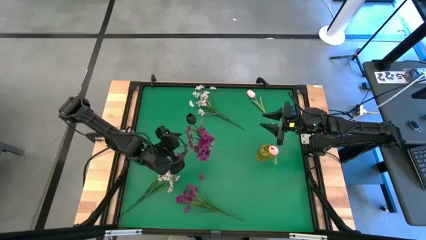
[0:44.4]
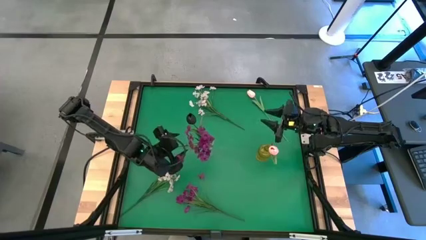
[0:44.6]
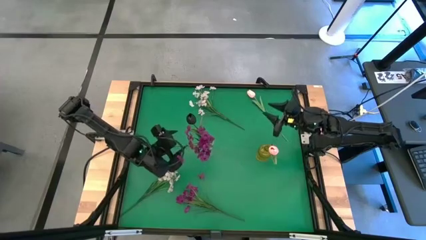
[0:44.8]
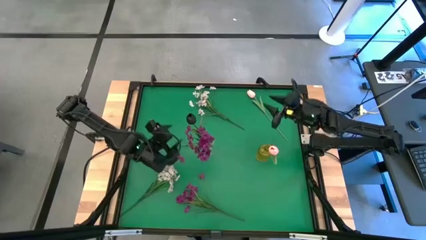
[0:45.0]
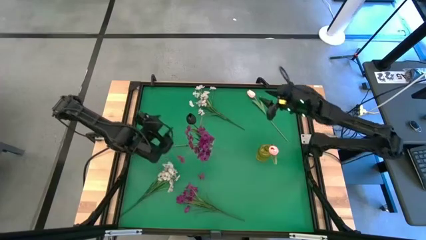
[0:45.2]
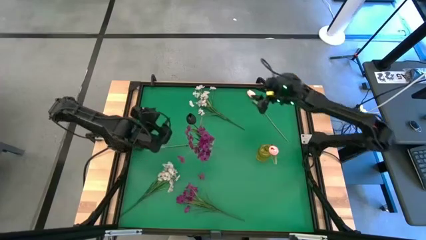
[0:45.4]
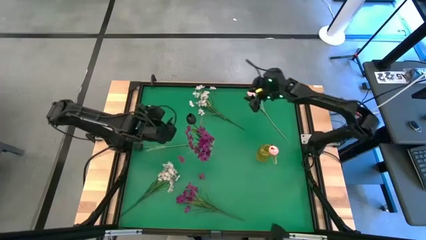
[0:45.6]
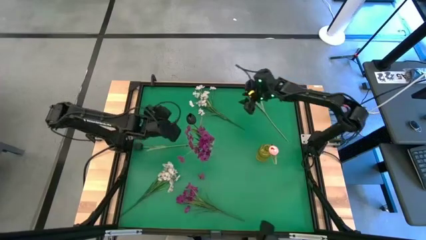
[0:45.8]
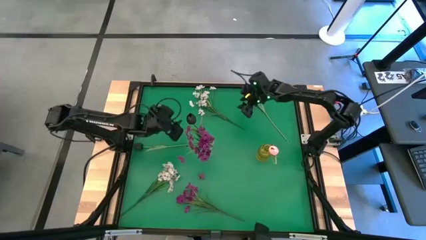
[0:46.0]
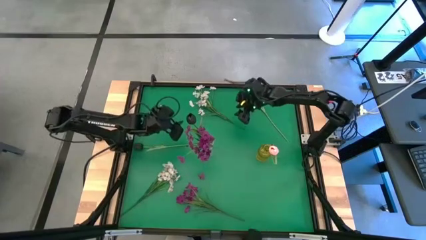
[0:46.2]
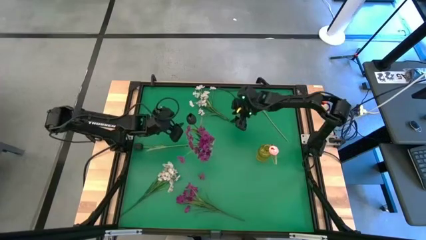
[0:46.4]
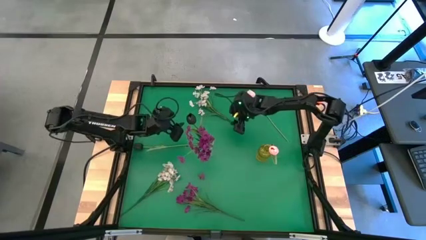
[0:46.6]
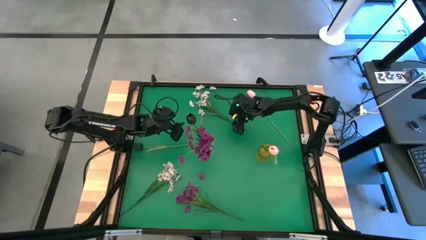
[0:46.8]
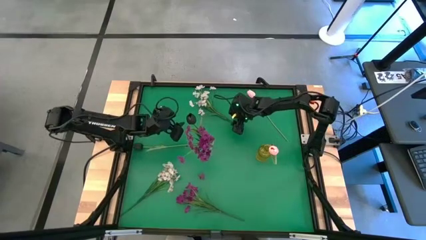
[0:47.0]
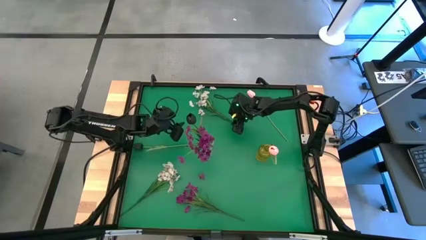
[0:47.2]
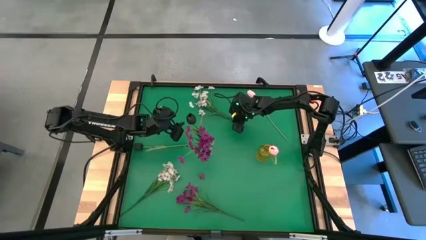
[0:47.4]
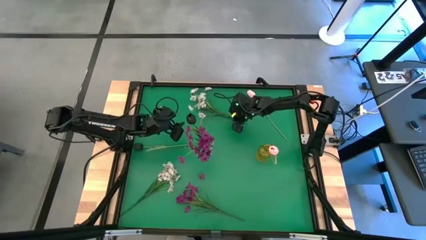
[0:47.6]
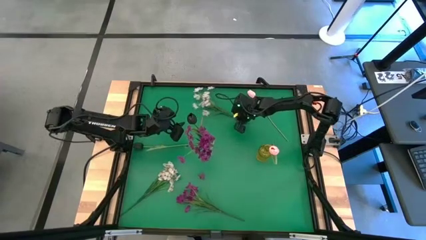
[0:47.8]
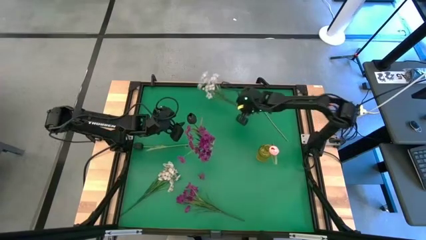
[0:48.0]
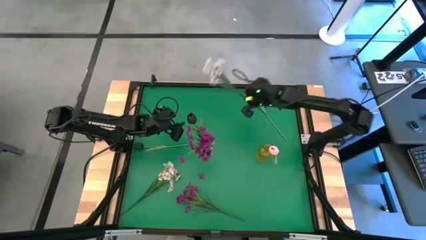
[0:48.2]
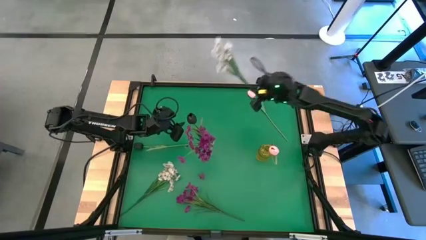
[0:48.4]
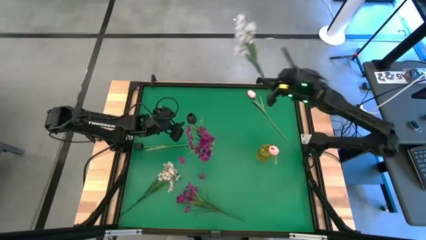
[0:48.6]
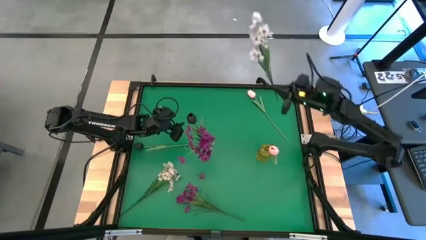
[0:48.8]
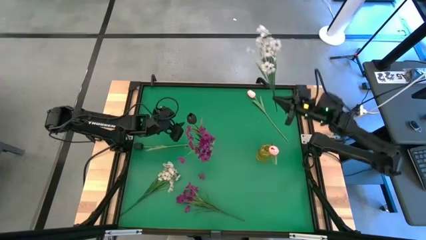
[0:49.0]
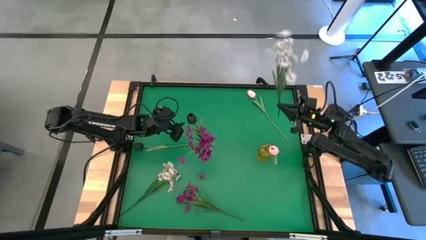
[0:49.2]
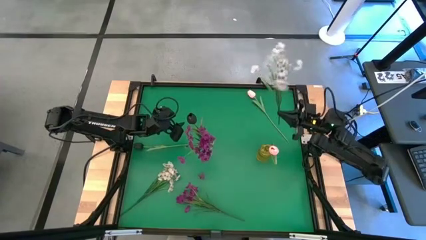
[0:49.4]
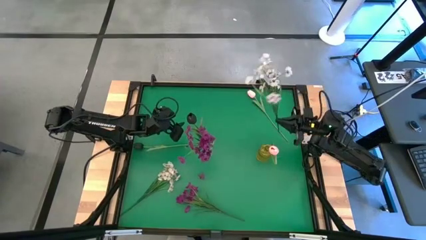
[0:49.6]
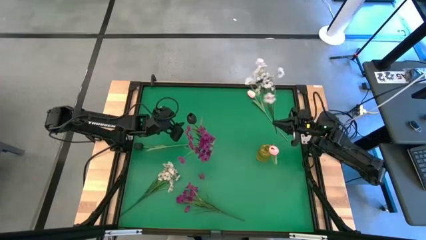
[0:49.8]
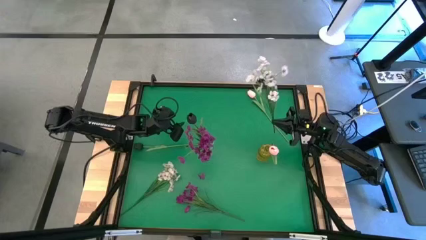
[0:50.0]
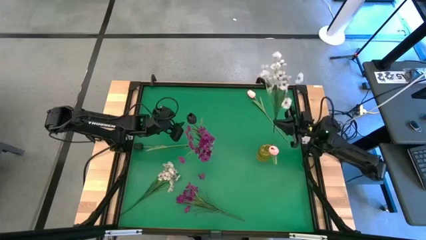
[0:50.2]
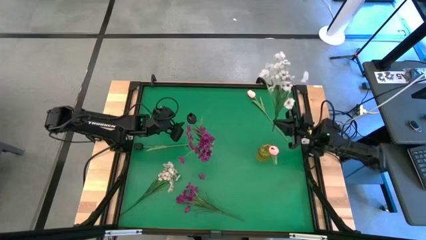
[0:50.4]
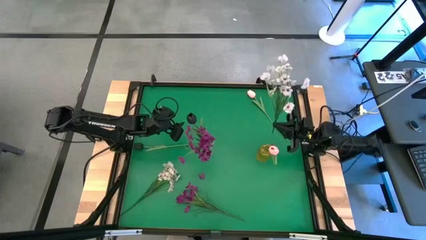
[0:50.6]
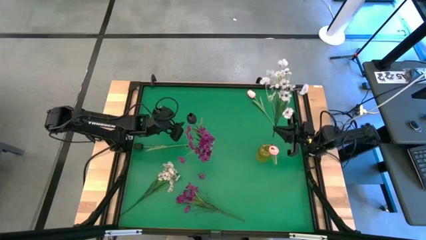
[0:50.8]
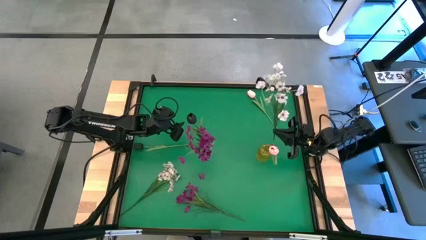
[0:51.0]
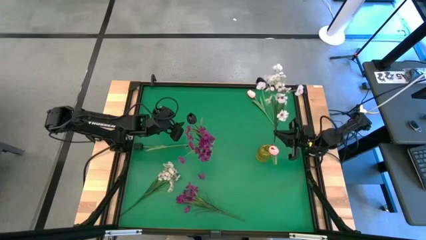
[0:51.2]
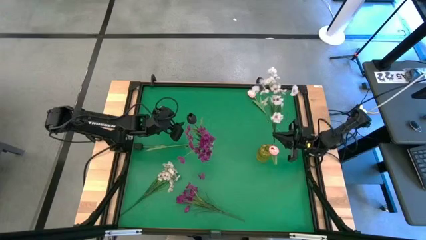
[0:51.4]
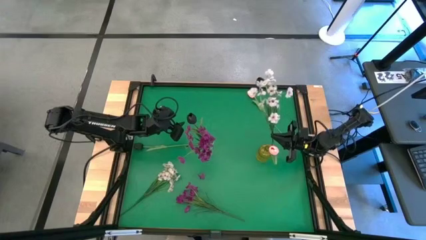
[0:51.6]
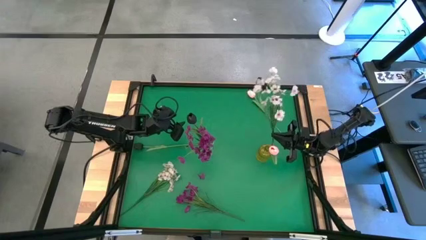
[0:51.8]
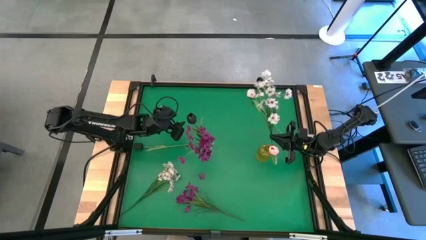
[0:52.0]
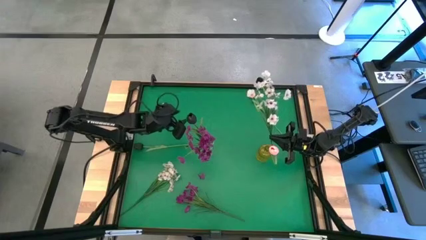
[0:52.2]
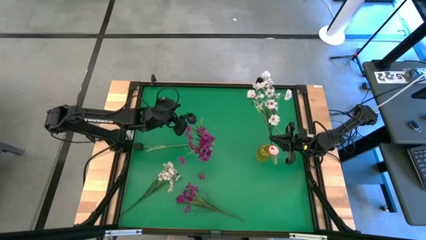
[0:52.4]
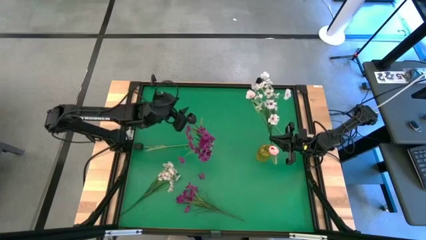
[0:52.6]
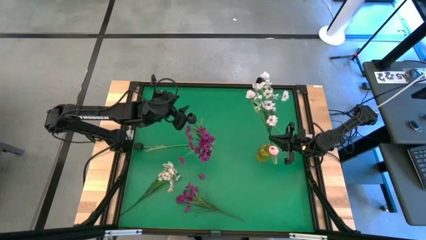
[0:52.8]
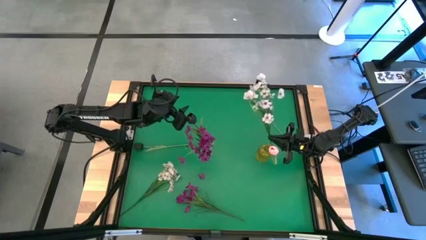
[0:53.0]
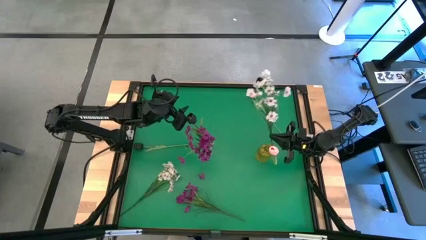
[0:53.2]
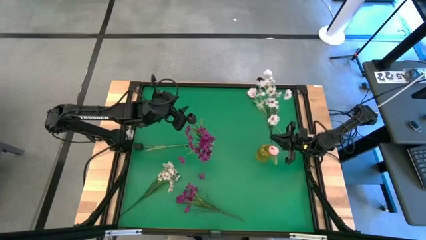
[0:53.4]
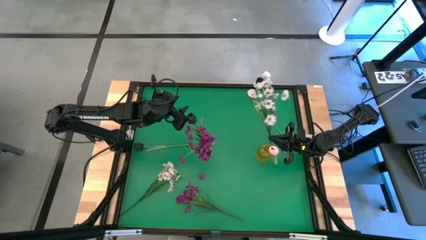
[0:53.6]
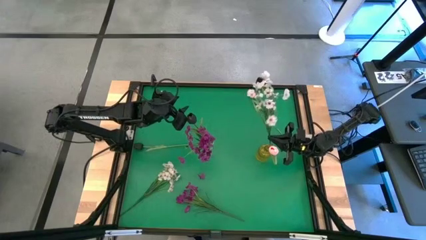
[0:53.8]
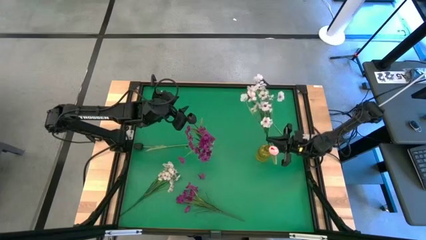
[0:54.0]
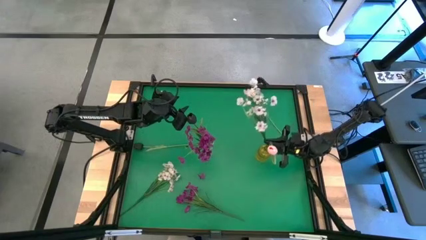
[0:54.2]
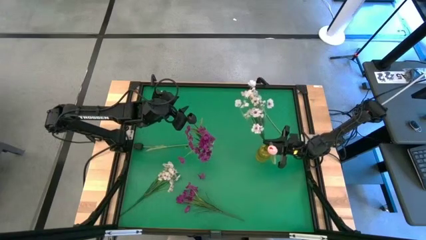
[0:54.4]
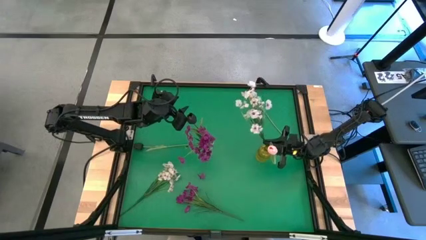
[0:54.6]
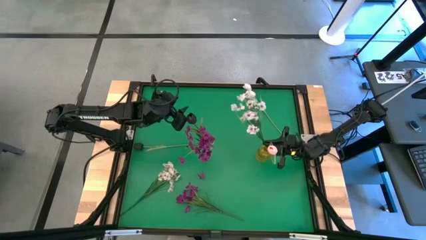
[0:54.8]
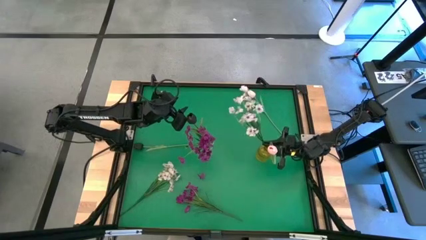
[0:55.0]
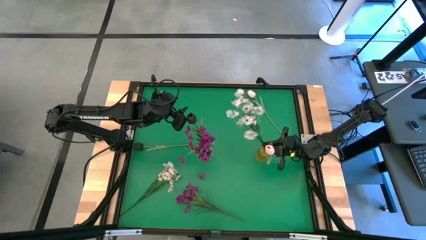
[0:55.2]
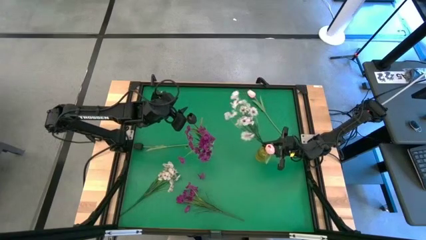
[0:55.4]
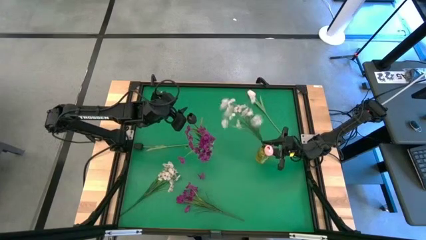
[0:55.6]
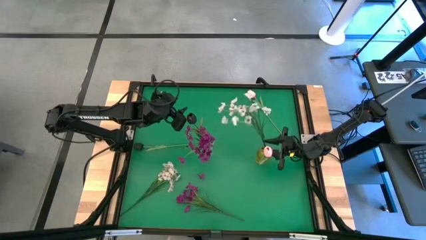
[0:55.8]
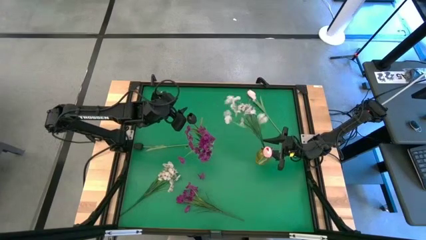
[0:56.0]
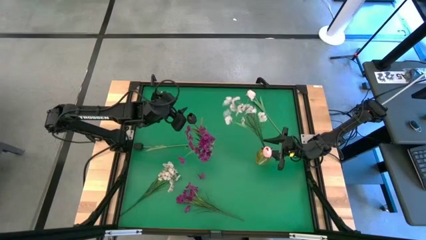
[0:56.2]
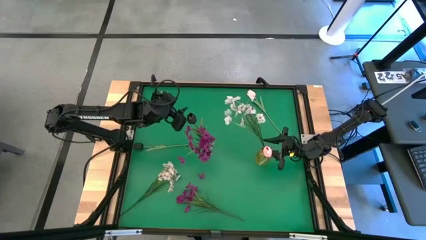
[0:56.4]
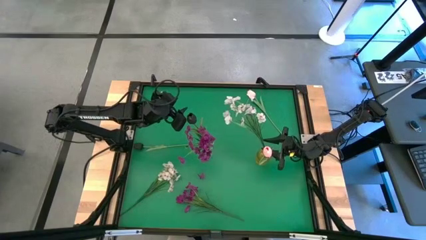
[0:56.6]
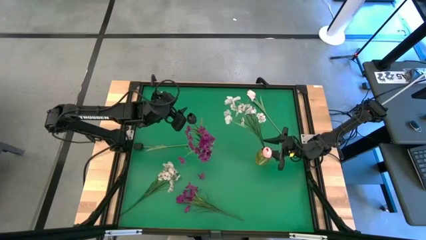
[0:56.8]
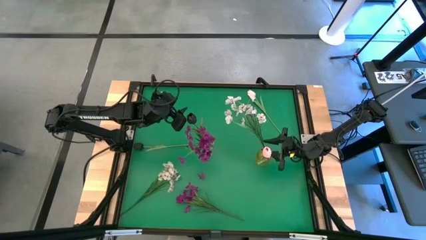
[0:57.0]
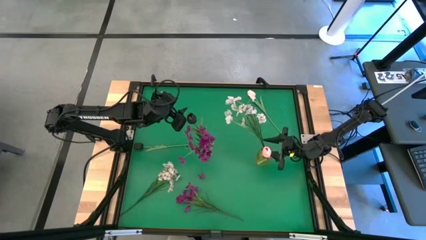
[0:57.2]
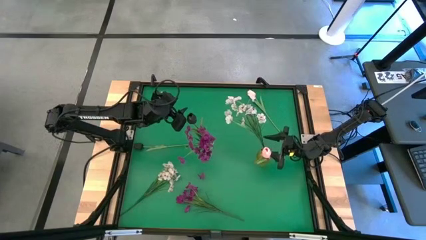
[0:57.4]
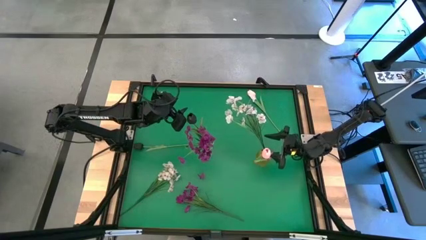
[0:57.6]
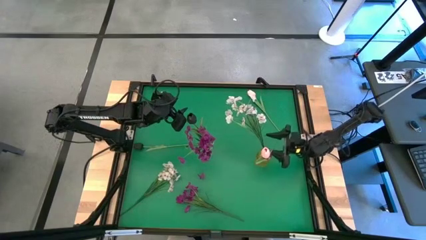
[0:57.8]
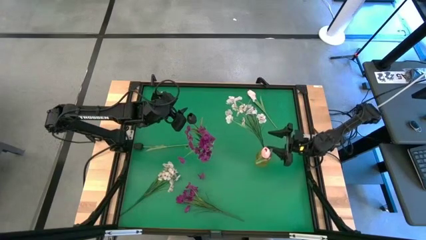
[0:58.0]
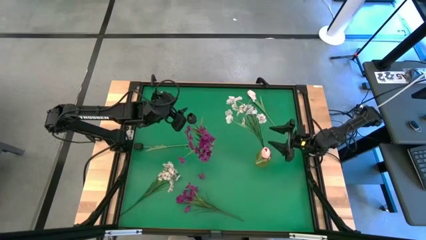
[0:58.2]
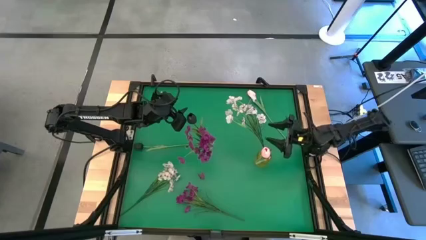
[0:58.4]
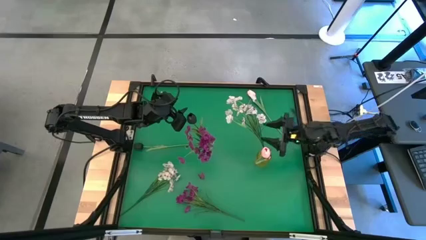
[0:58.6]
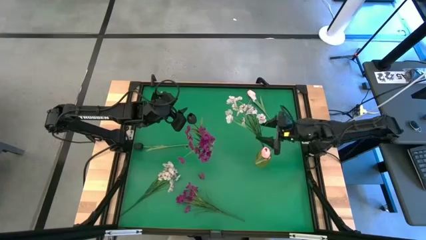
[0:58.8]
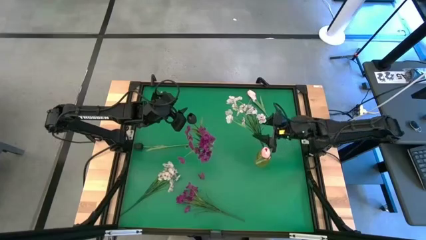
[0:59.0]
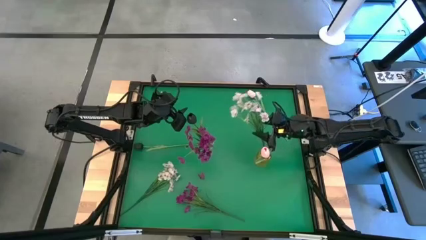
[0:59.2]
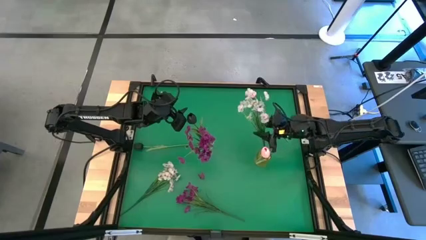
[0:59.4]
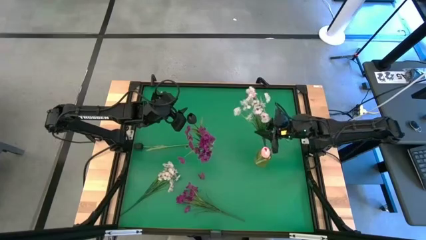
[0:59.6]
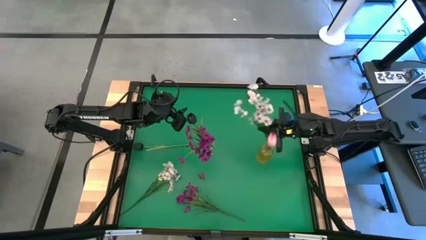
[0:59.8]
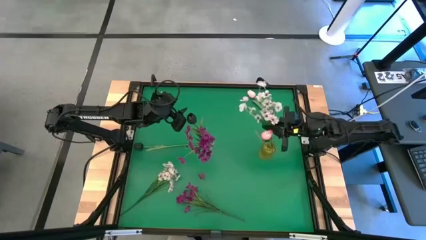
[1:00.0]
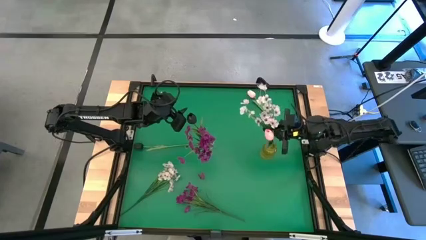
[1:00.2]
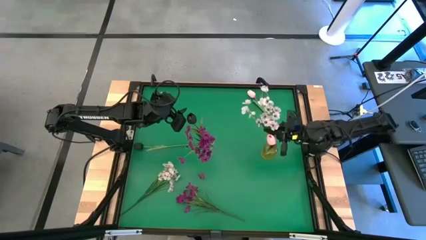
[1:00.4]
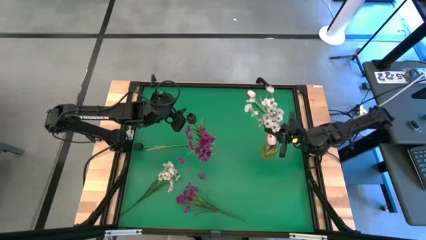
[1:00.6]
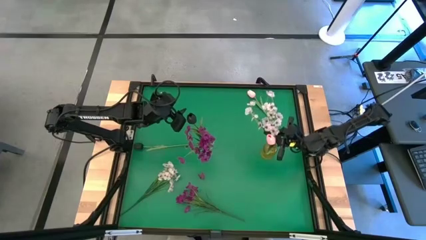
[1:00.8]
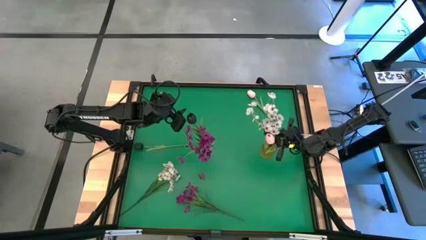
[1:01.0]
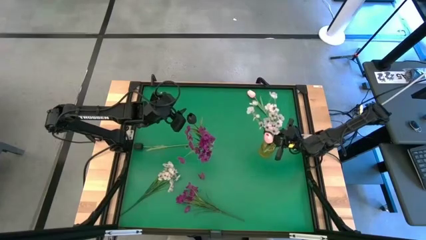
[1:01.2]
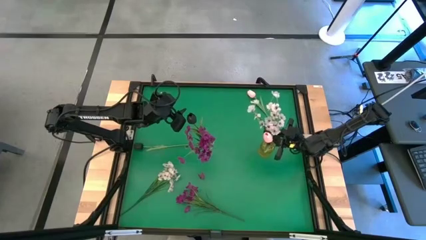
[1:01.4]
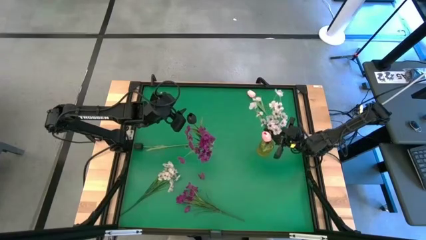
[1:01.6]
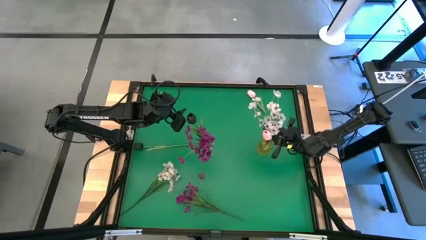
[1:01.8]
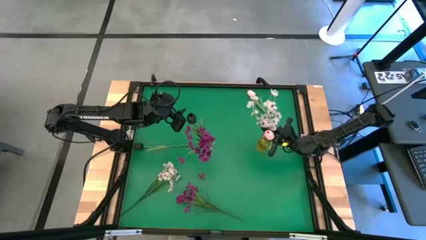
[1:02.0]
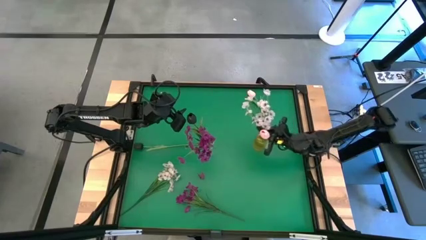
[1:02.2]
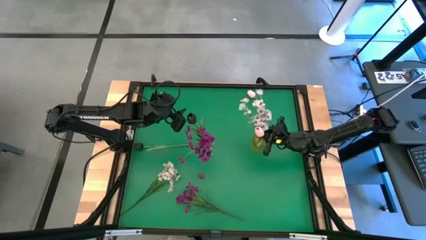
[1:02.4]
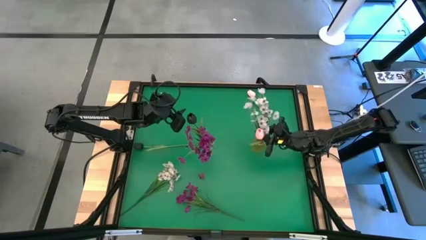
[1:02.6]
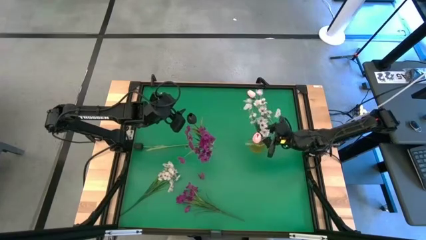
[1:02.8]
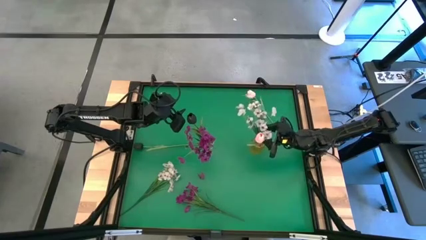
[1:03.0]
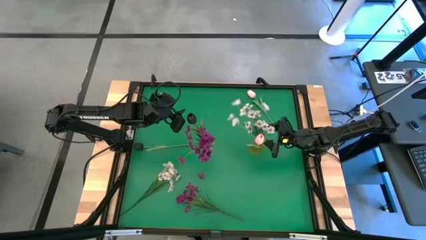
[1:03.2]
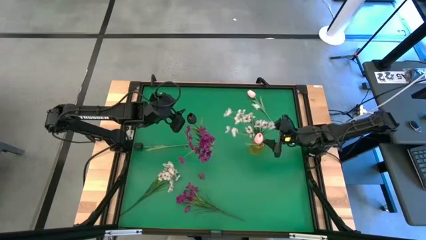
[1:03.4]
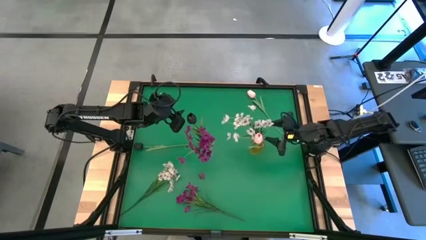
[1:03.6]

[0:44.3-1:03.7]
Task: Sort flowers into vase by color
Put the top white flower into the yellow vase
